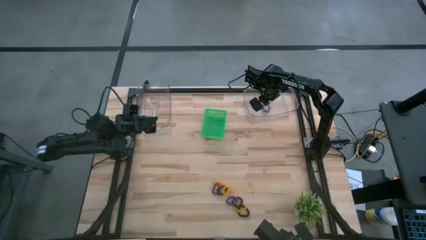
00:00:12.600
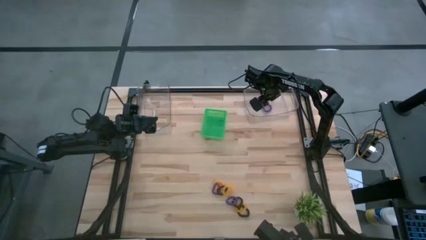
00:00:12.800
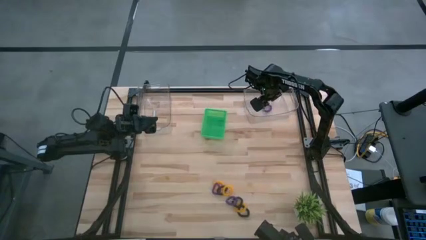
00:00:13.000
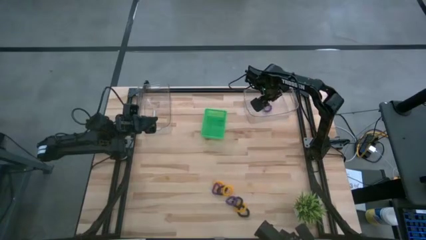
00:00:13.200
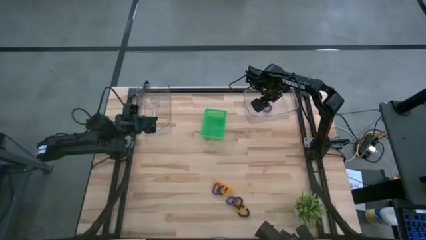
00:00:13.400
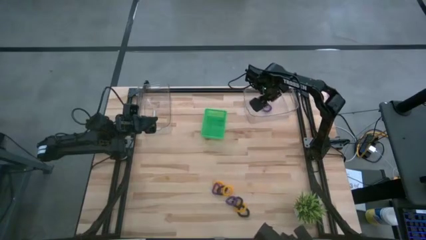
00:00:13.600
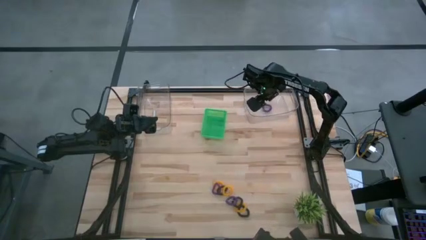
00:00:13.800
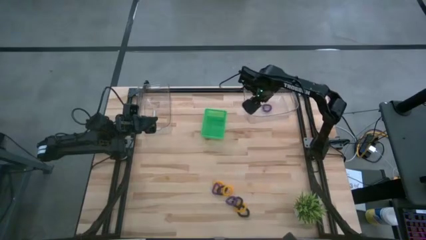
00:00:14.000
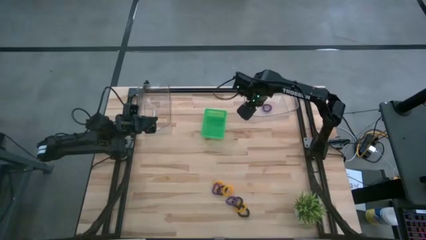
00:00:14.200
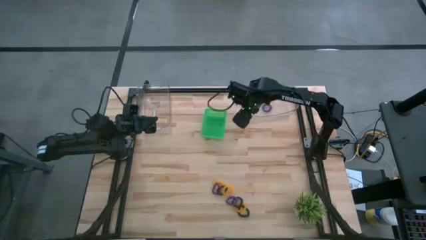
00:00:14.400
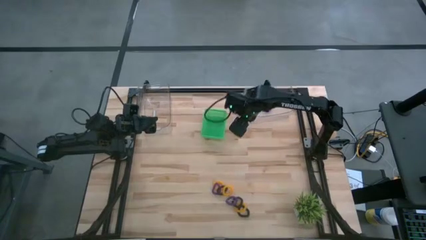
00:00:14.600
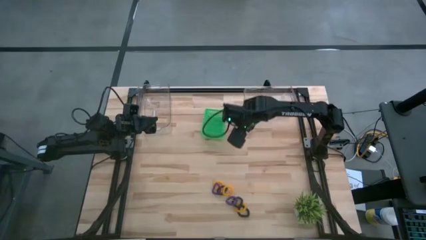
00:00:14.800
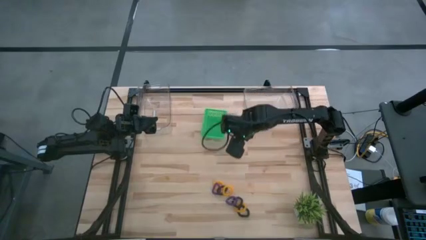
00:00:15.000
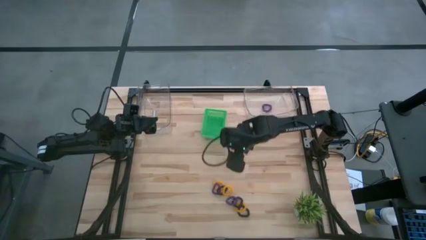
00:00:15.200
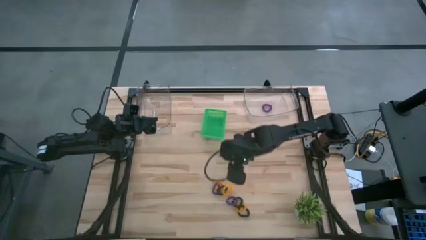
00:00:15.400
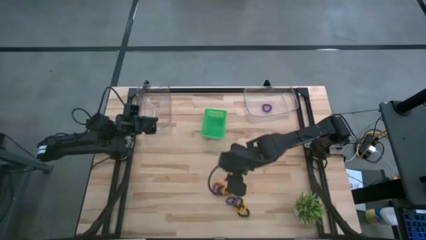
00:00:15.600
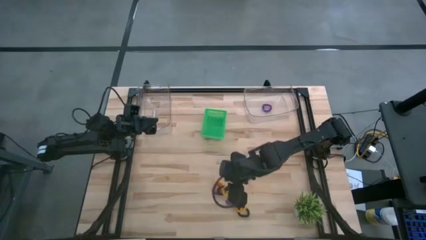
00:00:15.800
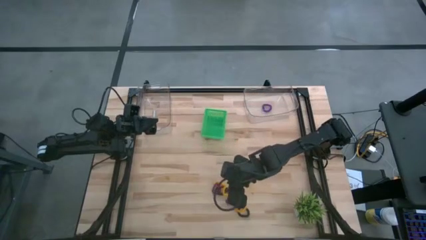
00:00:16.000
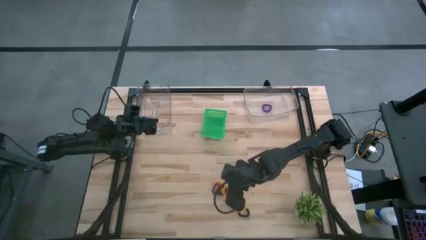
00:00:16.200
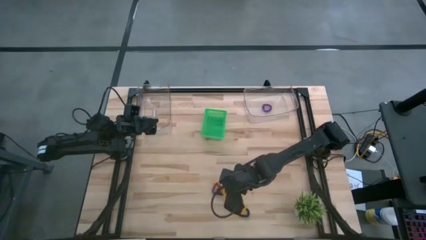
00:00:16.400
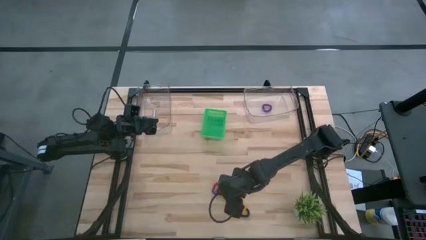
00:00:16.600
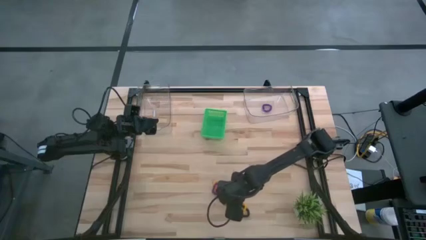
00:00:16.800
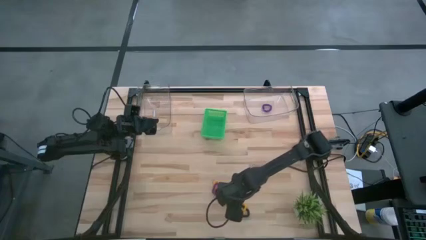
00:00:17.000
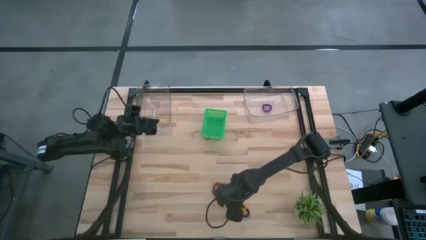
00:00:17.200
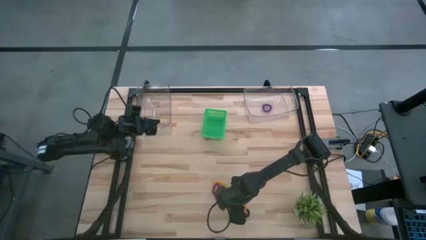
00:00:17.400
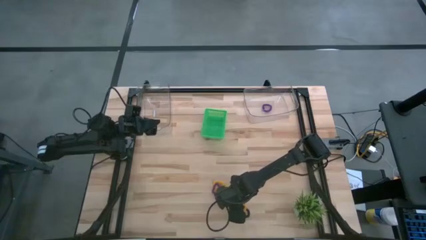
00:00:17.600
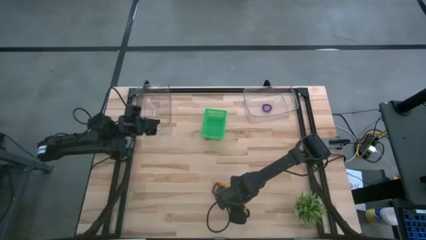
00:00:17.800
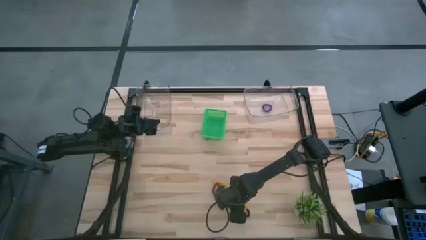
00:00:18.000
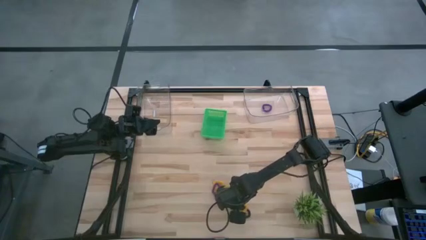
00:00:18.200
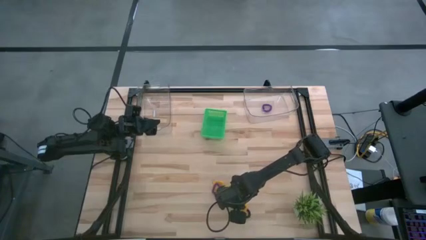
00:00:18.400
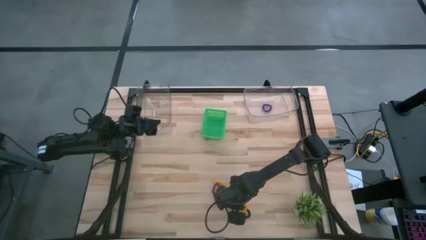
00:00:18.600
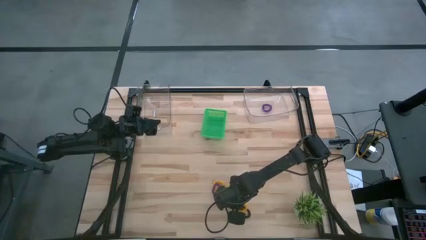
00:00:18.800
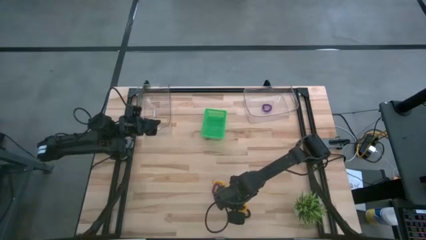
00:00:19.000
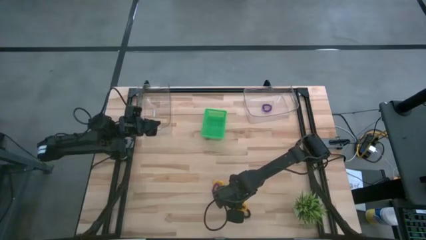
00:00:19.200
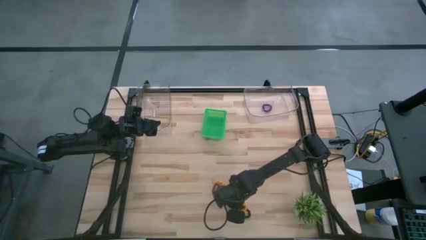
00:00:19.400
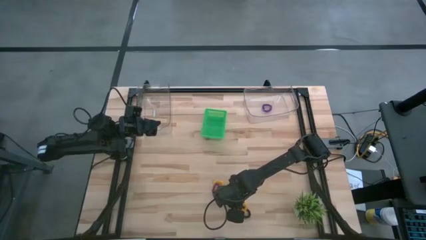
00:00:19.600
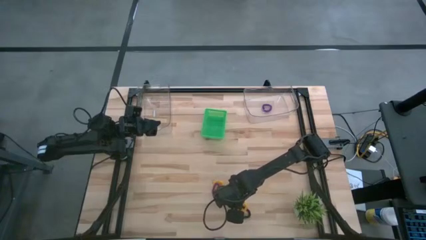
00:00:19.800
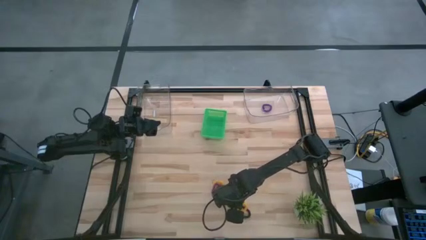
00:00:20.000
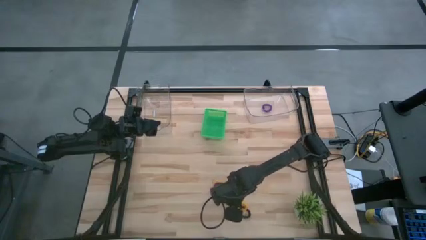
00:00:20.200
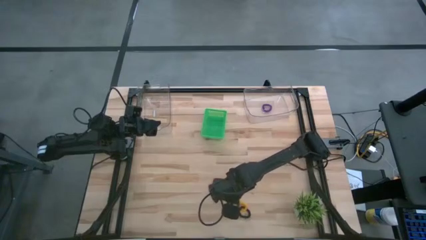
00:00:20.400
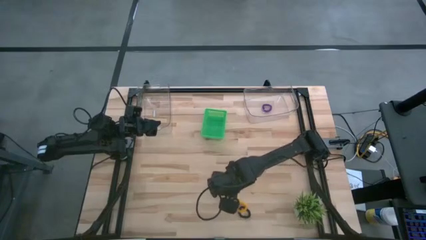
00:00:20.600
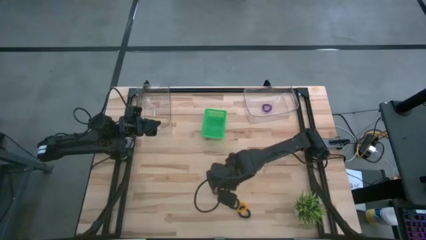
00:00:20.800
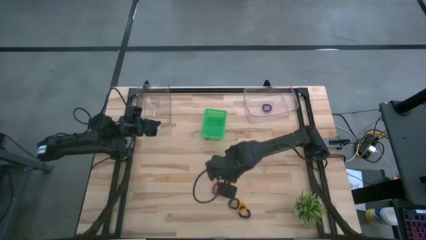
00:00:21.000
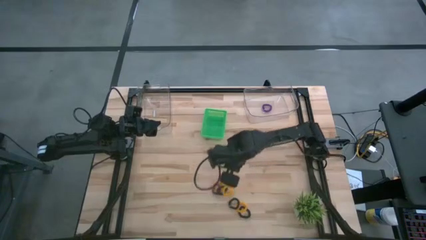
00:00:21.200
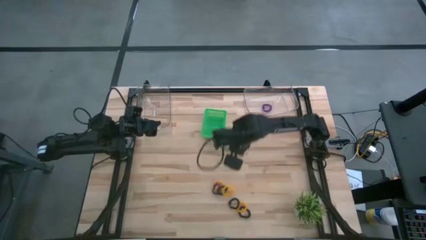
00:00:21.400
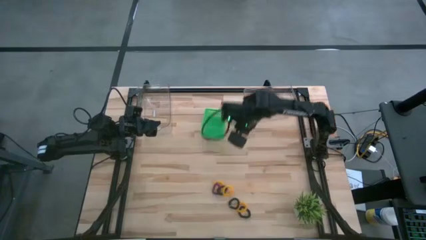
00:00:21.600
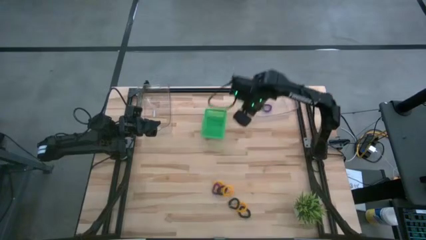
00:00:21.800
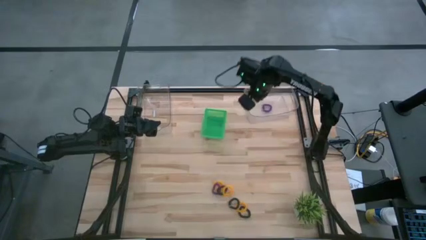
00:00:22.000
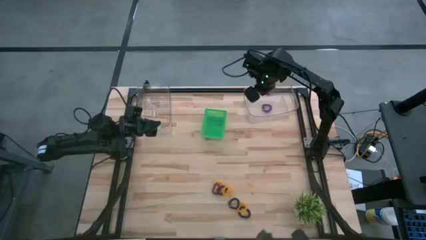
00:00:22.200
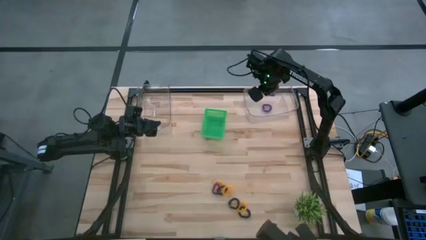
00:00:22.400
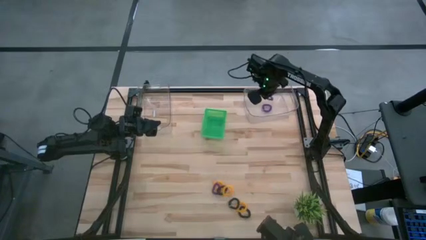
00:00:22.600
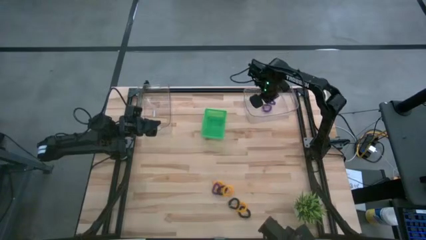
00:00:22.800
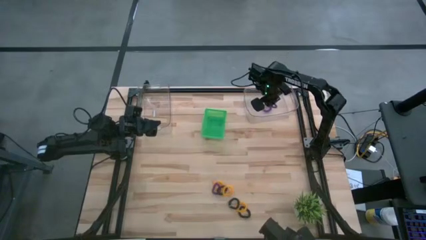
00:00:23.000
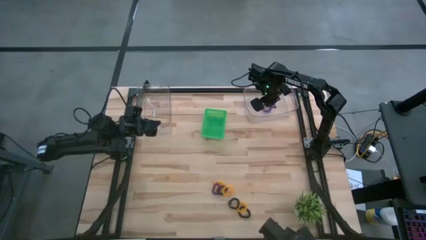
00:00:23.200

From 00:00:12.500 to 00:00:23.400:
Task: Sort spring keychains
Put the bottom purple spring keychain into the right transparent bin
